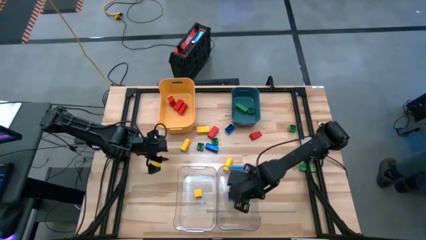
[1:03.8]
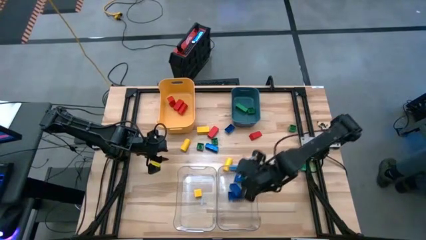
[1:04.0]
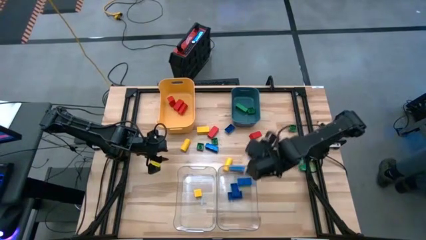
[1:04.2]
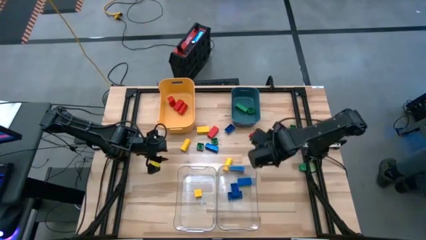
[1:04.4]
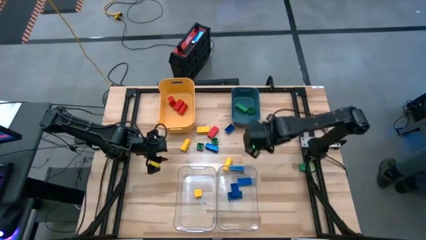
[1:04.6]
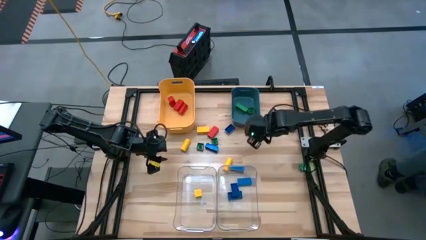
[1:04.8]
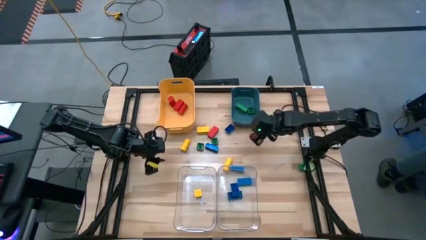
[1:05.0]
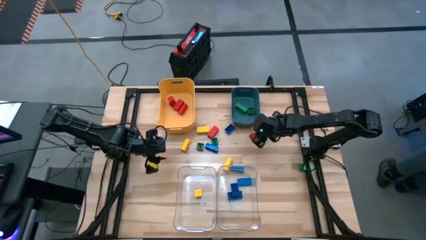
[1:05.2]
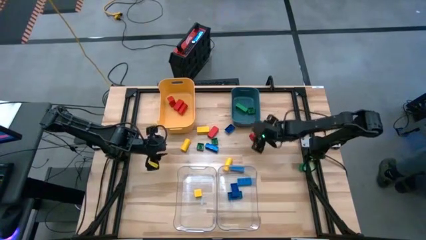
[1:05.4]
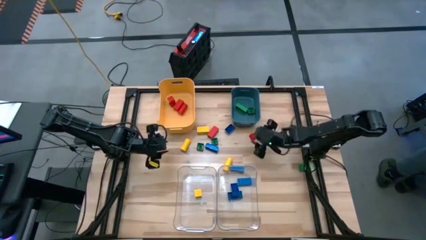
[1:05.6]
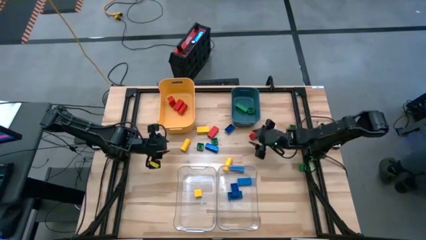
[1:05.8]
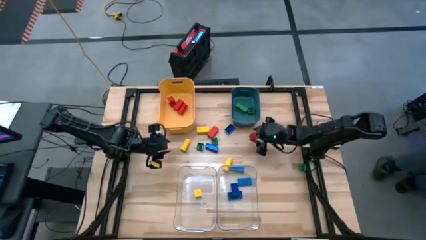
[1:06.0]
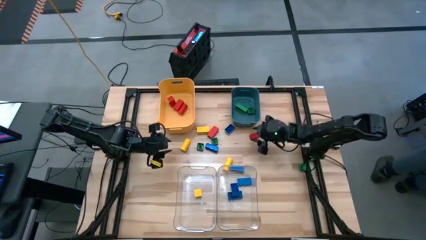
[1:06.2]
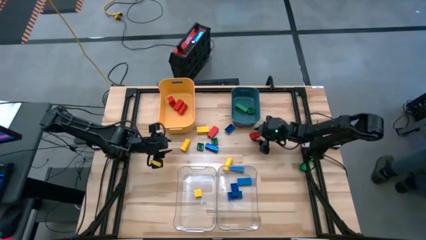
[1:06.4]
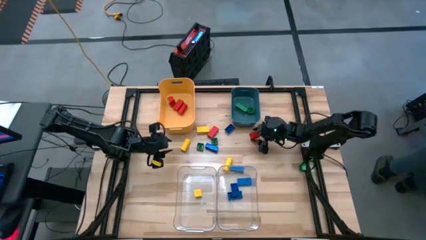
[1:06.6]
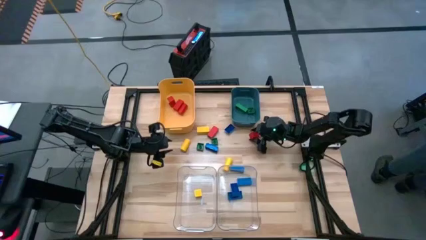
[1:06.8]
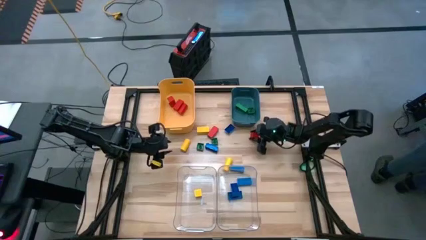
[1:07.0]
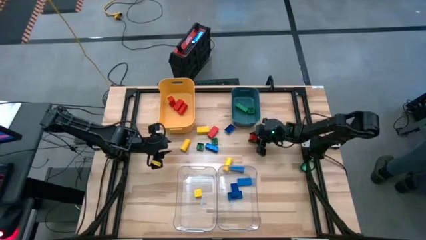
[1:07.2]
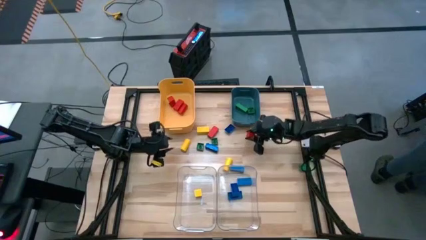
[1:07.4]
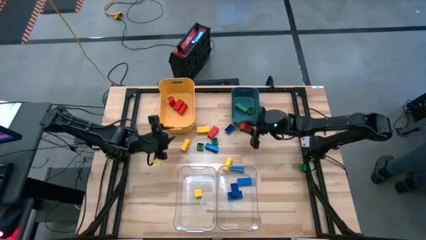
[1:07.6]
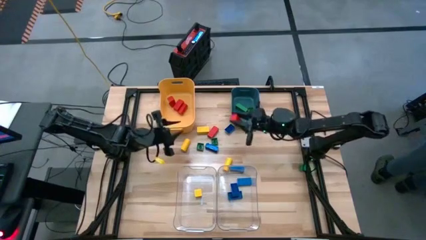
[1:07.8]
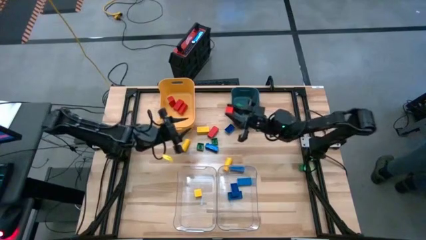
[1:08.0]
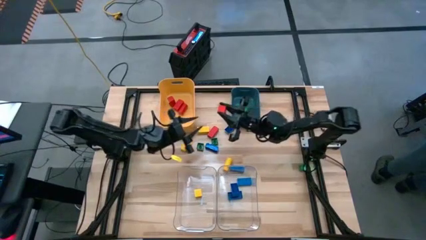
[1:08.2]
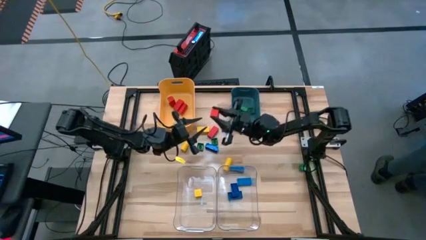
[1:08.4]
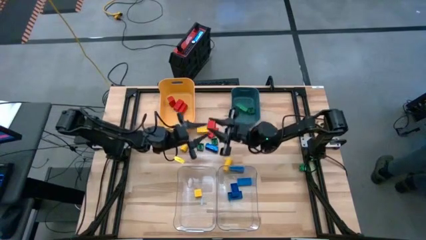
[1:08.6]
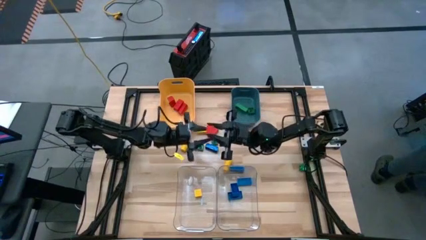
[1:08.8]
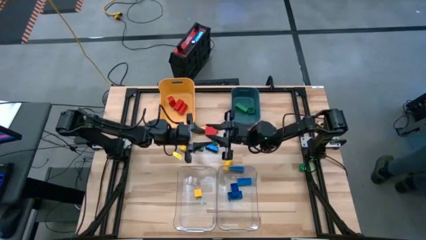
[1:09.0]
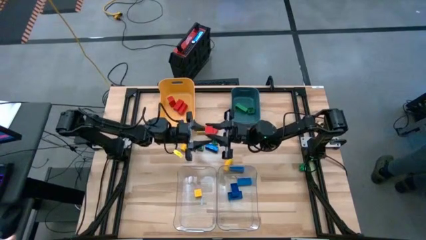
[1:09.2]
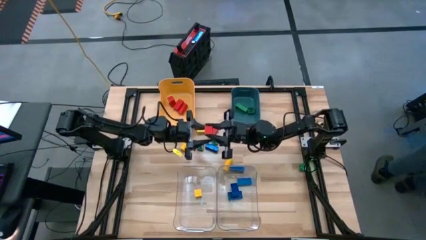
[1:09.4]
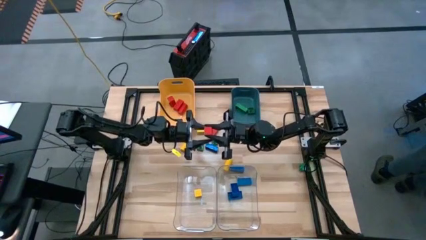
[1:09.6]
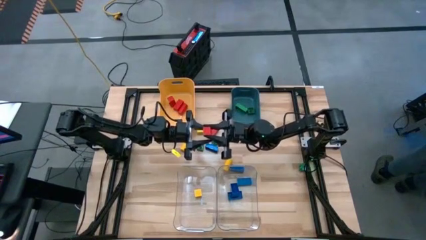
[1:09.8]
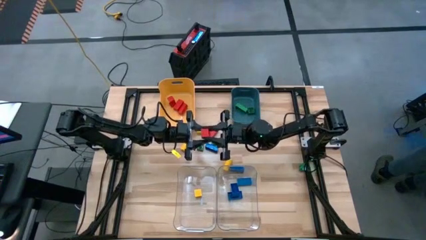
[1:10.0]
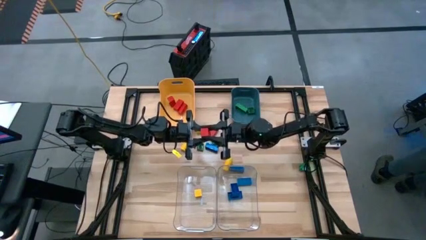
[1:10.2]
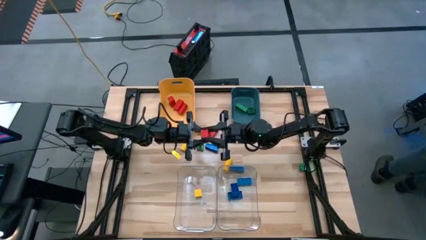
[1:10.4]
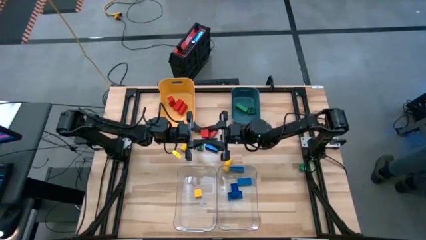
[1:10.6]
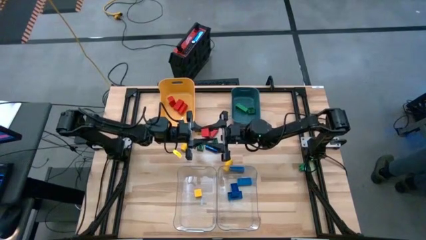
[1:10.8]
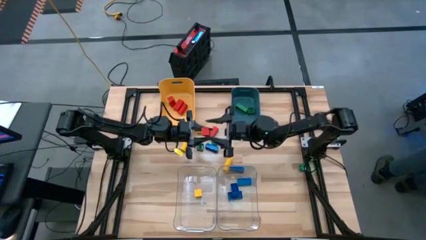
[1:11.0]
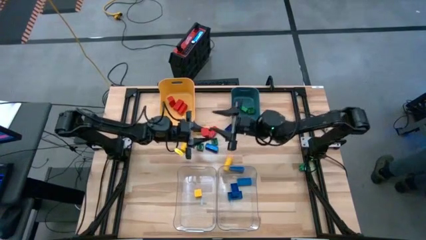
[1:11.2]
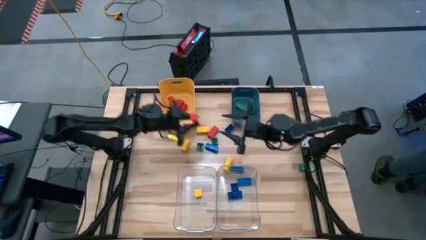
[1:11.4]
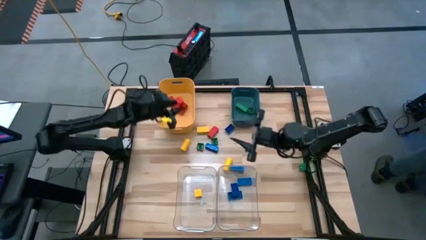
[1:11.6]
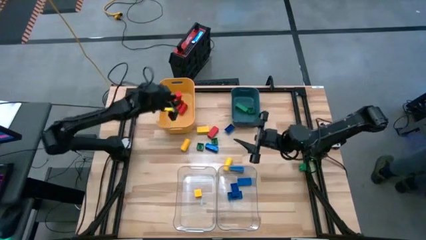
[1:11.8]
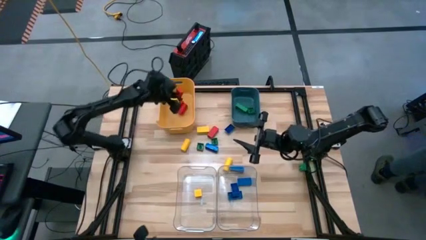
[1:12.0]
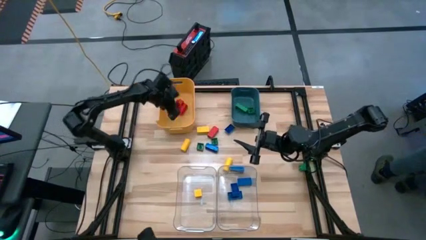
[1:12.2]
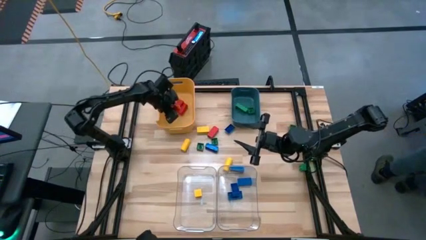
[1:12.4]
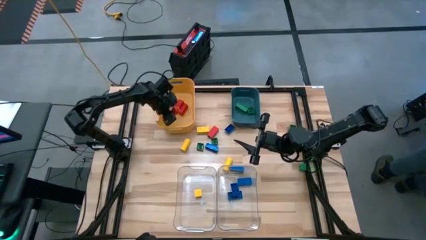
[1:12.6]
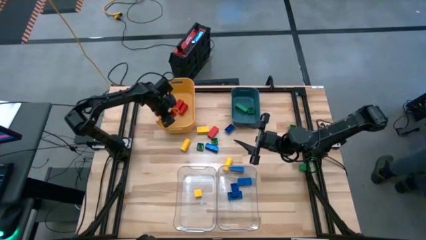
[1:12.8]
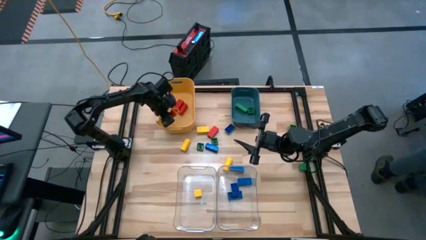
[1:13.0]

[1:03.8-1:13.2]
Task: Sort blocks
Put the red block into the yellow bin

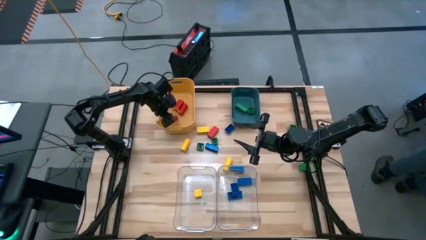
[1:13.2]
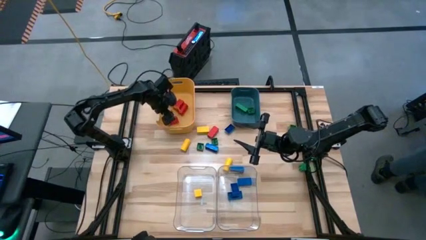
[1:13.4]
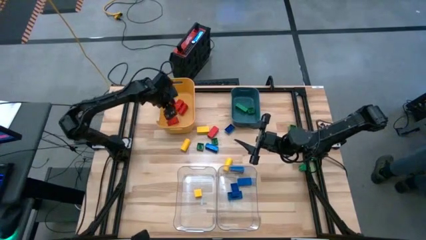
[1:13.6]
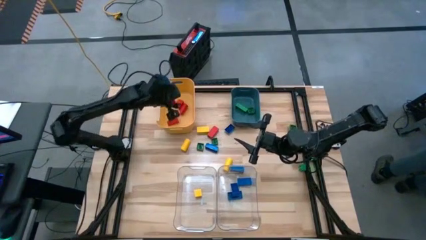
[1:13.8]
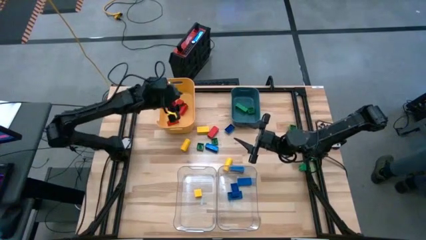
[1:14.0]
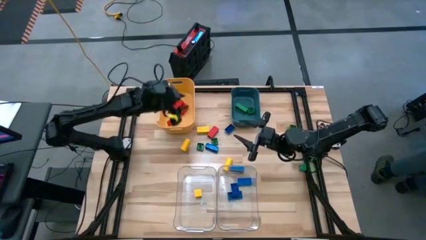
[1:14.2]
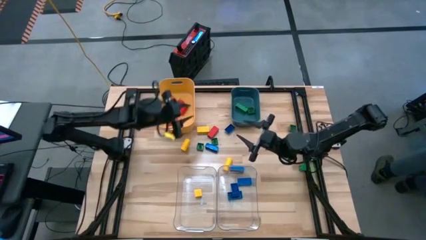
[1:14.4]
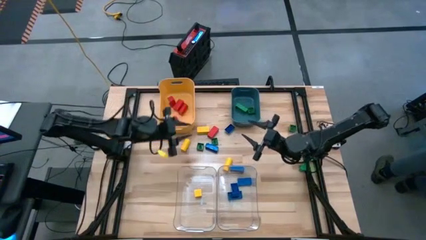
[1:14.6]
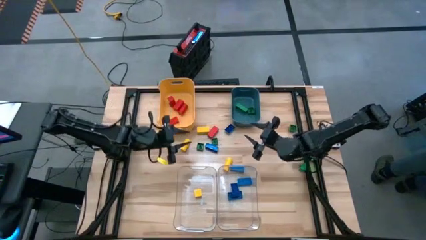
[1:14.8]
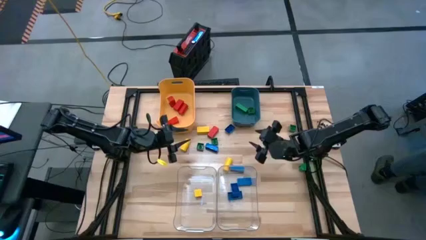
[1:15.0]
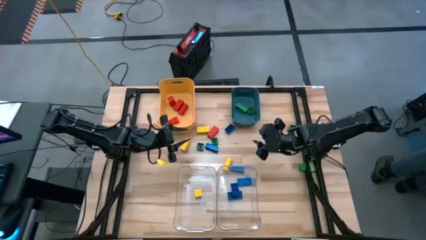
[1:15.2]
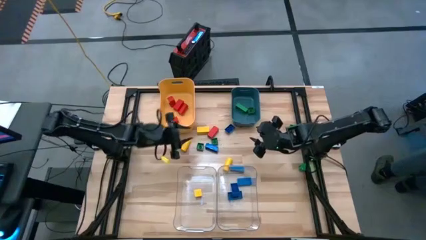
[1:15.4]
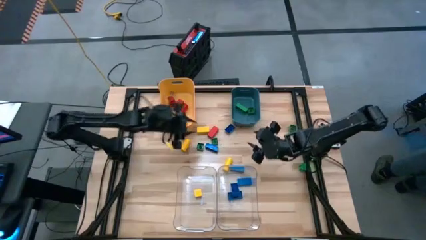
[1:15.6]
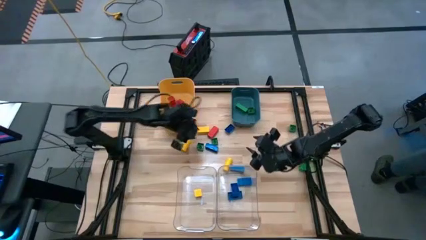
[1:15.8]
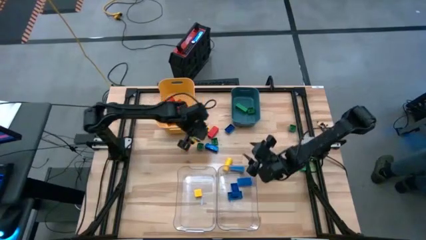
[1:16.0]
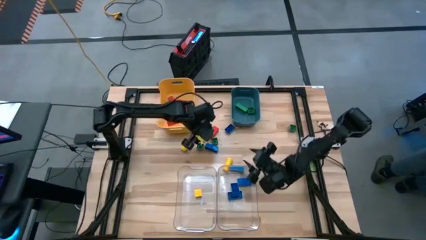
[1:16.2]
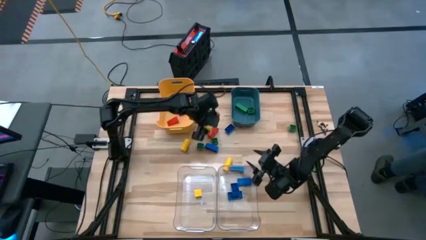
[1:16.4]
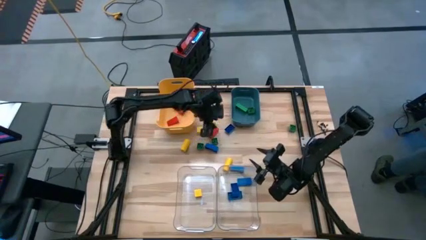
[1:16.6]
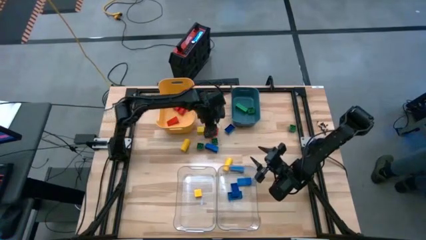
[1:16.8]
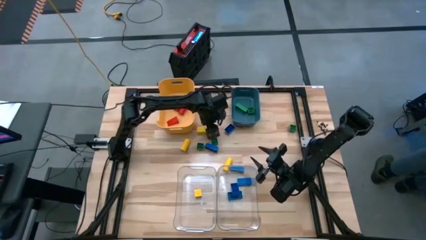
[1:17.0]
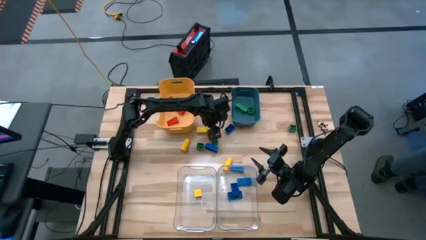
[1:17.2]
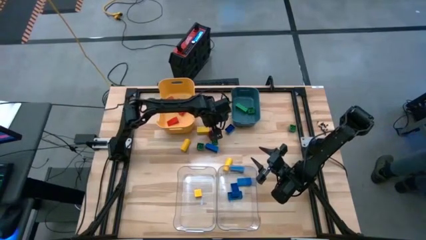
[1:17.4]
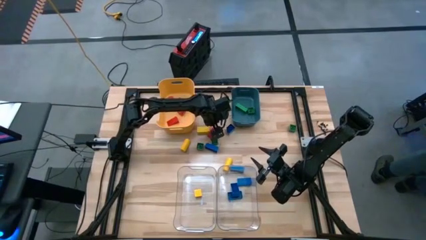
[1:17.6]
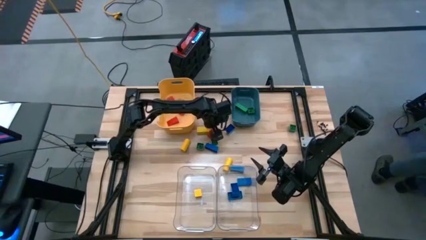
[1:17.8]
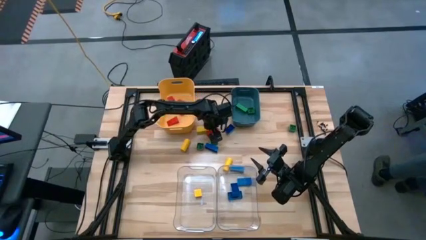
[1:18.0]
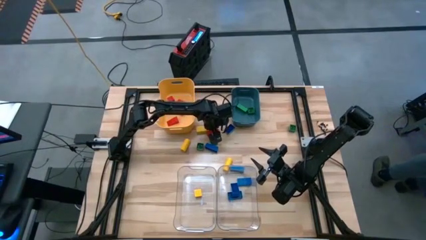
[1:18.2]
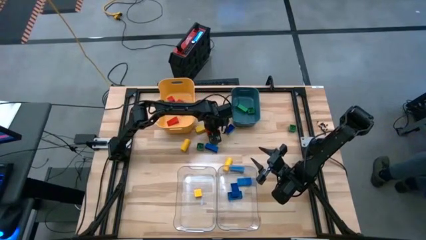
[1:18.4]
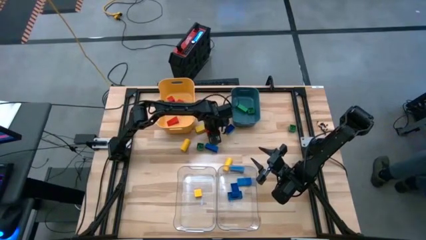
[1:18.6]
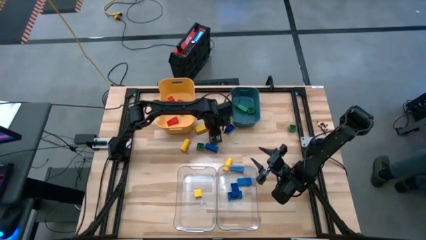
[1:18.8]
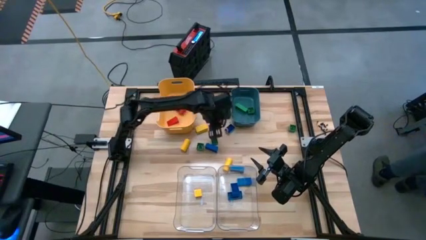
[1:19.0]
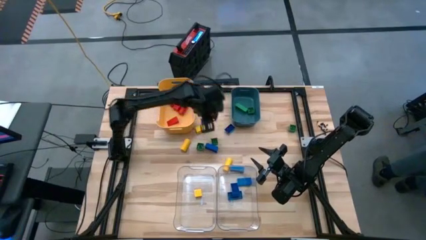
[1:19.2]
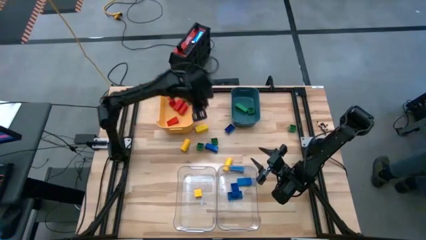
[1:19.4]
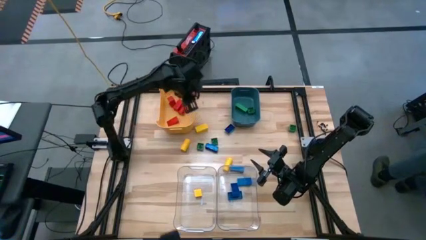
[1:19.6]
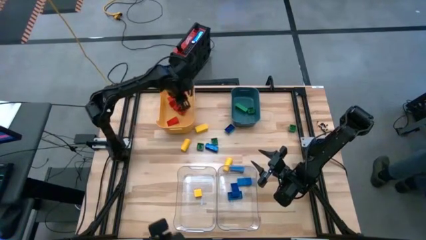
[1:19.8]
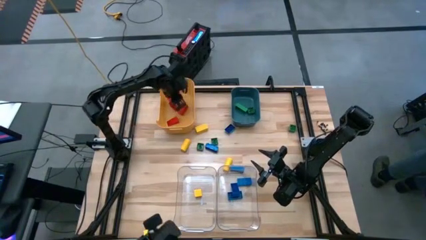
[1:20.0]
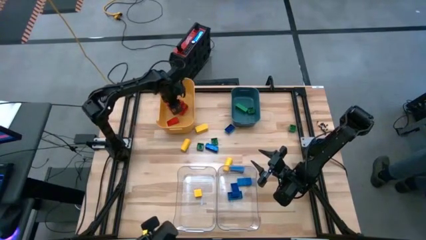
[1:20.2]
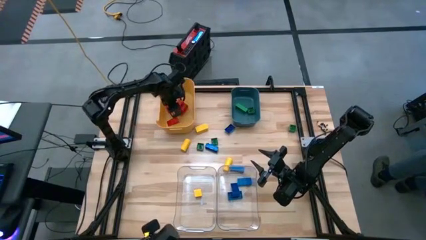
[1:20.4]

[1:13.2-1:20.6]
Put the red block into the yellow bin
